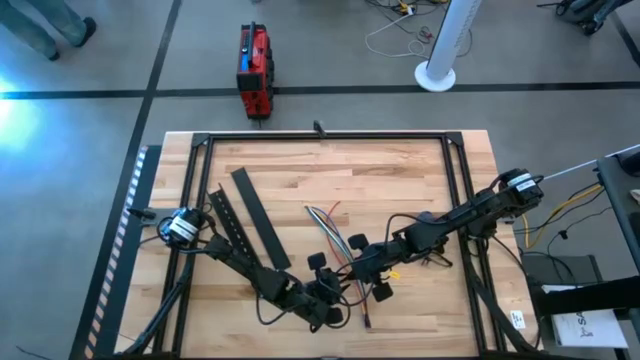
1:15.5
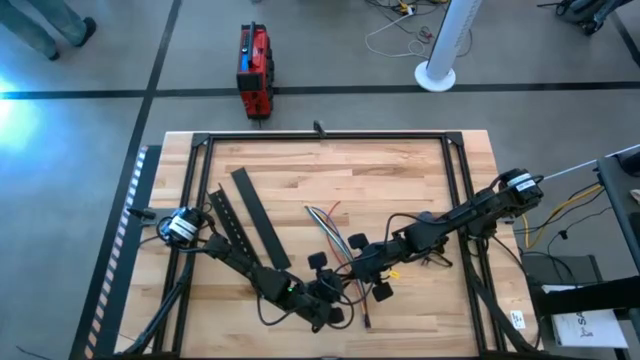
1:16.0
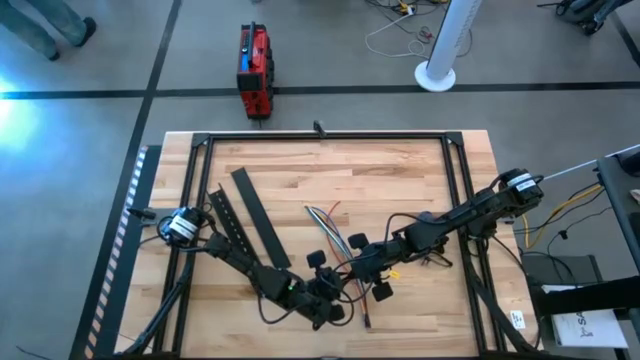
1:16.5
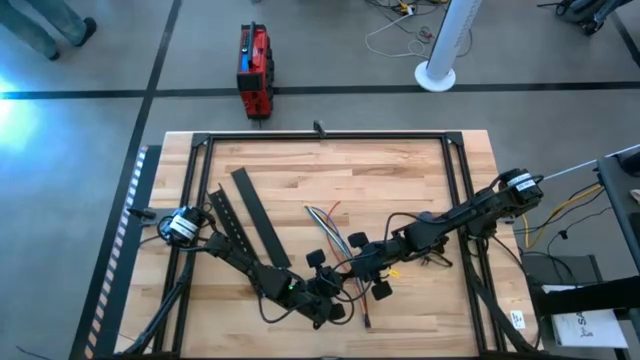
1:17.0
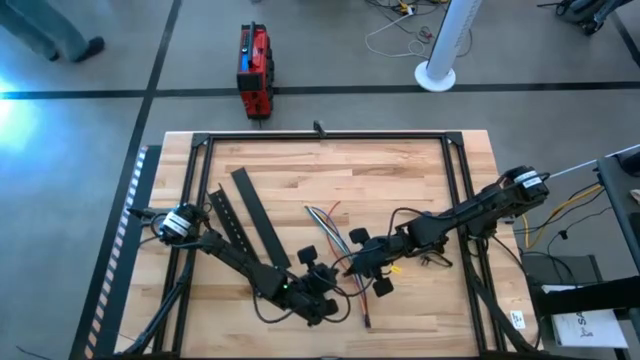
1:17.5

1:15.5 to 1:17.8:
Task: Ziptie cables
Wrap the cable wires with the black zip tie
